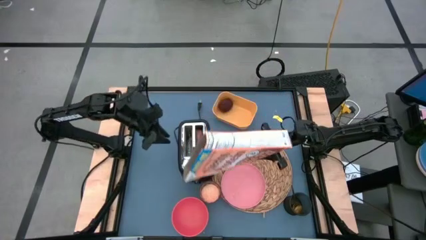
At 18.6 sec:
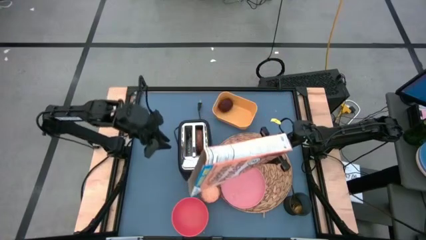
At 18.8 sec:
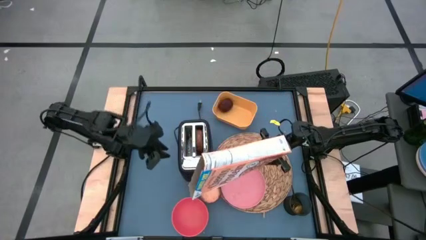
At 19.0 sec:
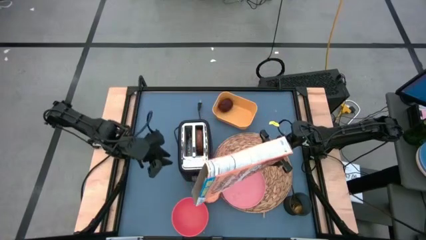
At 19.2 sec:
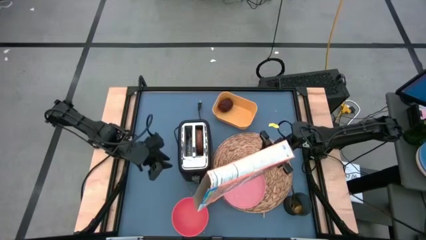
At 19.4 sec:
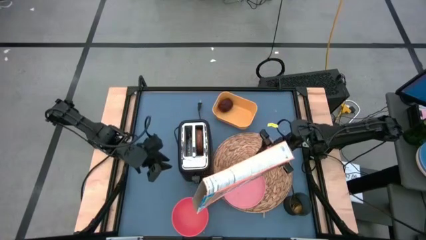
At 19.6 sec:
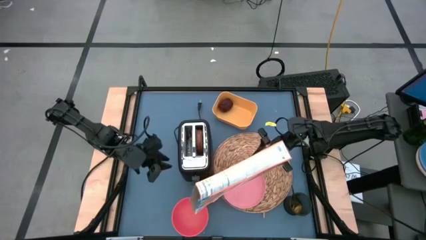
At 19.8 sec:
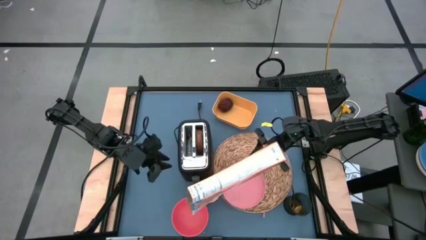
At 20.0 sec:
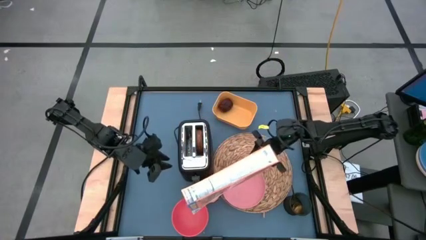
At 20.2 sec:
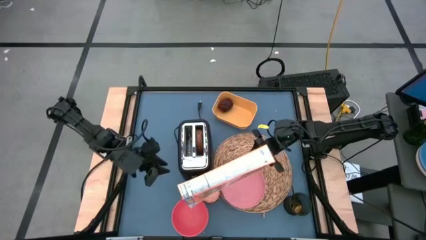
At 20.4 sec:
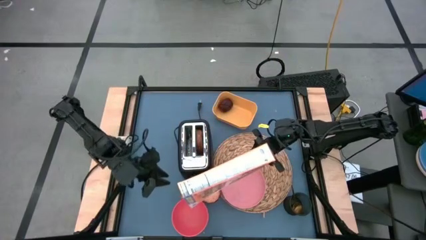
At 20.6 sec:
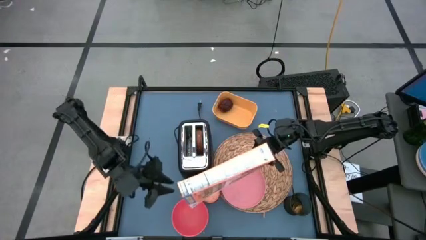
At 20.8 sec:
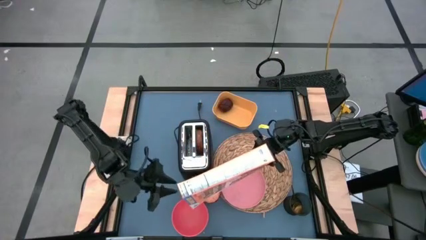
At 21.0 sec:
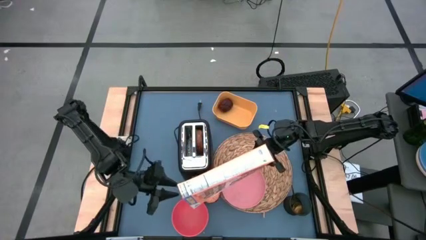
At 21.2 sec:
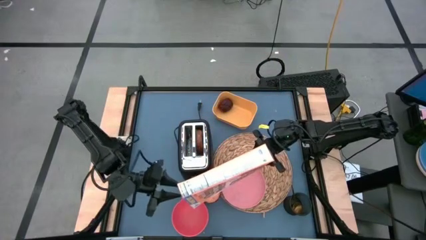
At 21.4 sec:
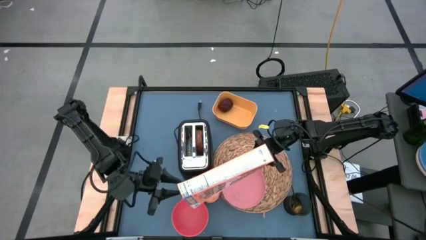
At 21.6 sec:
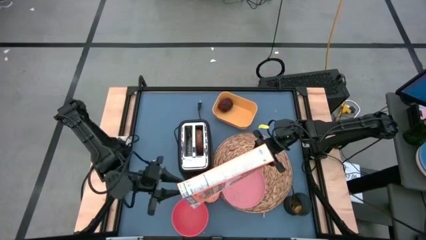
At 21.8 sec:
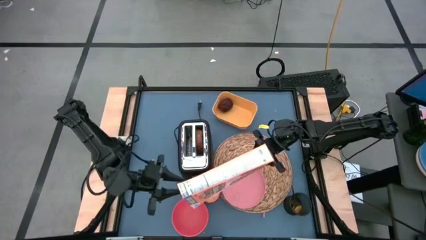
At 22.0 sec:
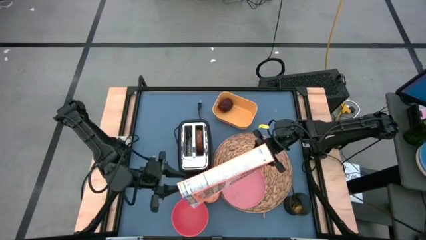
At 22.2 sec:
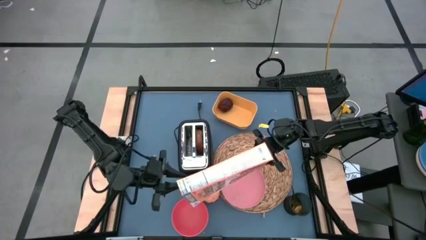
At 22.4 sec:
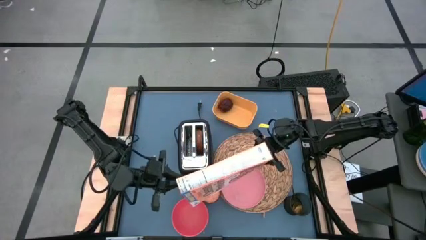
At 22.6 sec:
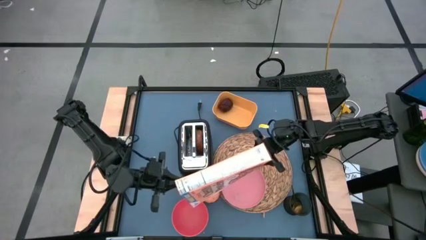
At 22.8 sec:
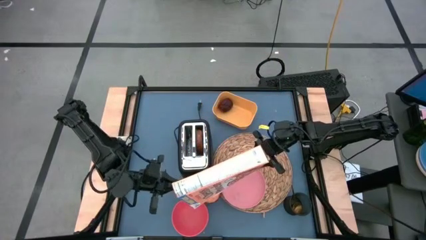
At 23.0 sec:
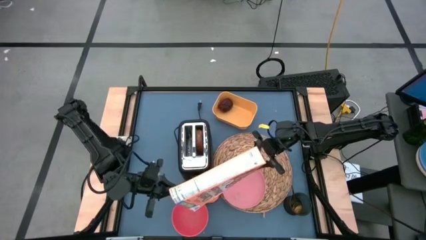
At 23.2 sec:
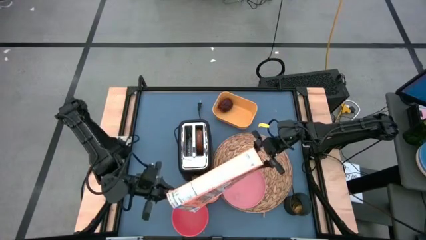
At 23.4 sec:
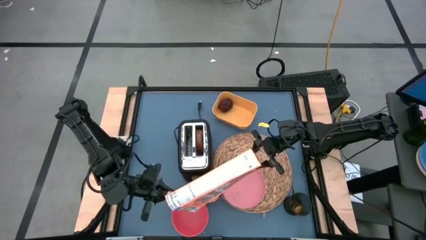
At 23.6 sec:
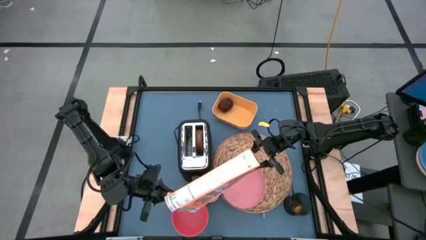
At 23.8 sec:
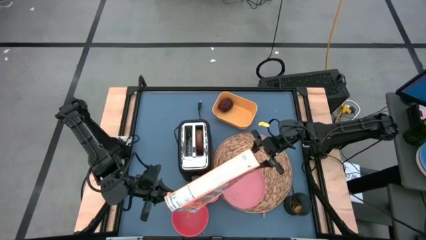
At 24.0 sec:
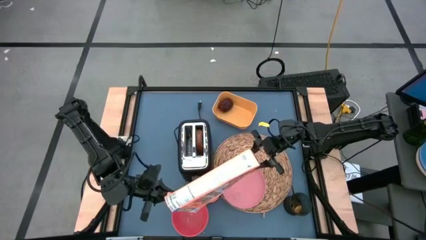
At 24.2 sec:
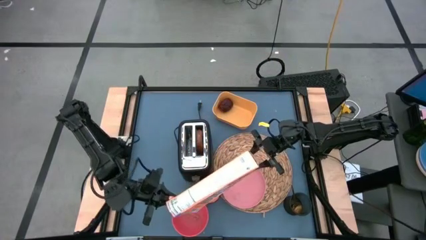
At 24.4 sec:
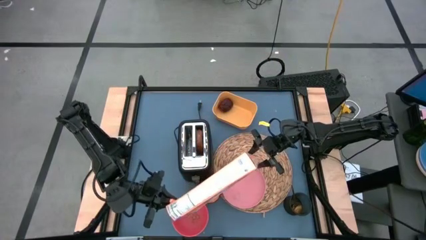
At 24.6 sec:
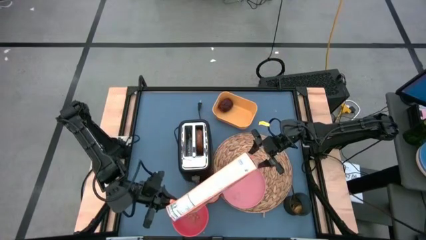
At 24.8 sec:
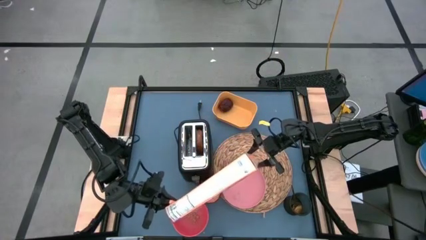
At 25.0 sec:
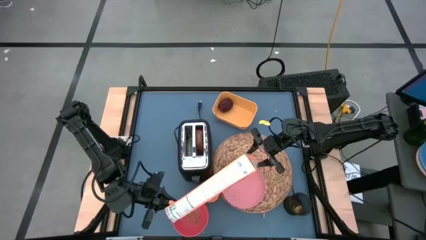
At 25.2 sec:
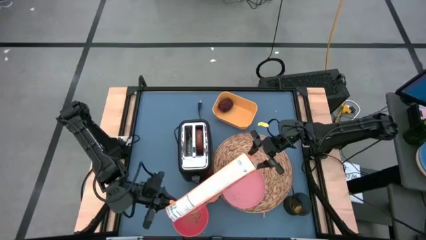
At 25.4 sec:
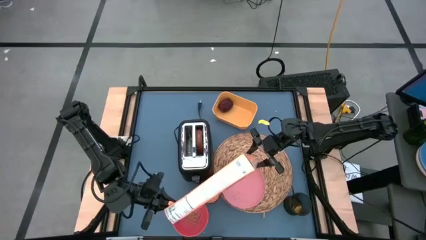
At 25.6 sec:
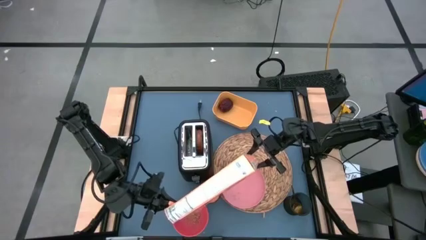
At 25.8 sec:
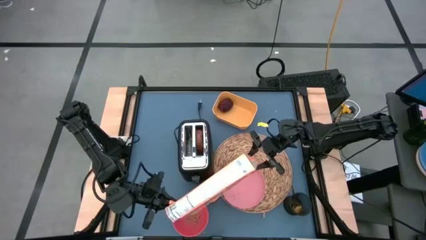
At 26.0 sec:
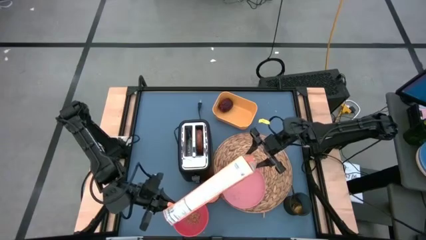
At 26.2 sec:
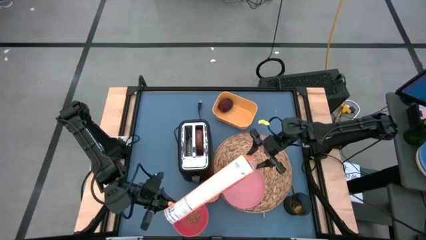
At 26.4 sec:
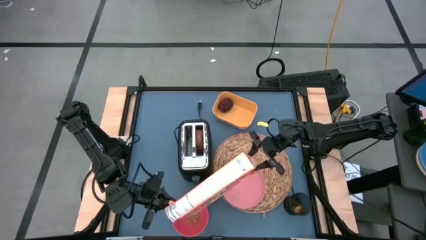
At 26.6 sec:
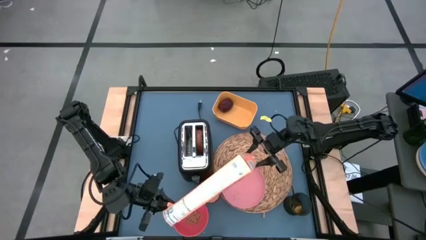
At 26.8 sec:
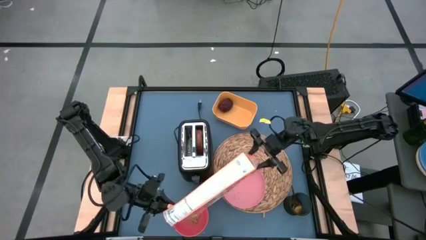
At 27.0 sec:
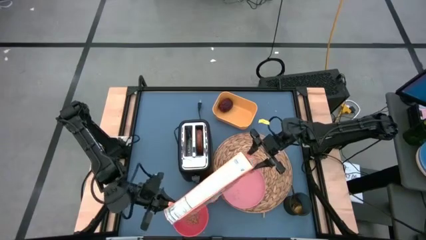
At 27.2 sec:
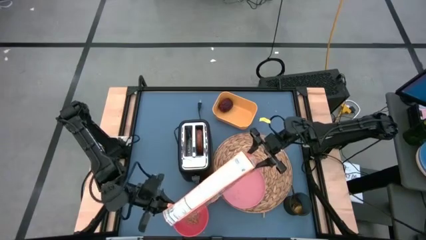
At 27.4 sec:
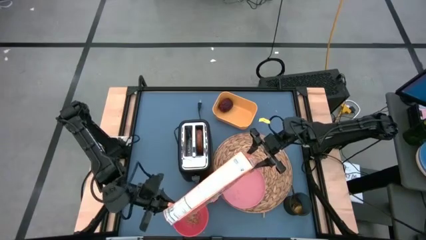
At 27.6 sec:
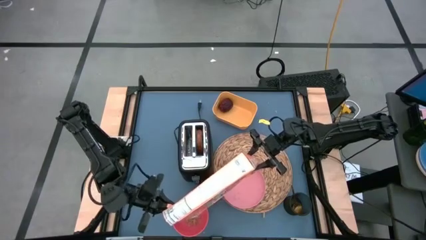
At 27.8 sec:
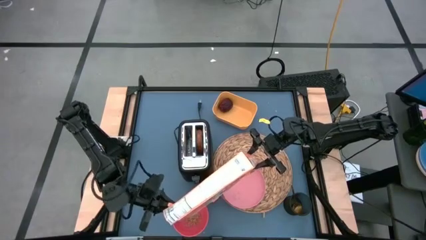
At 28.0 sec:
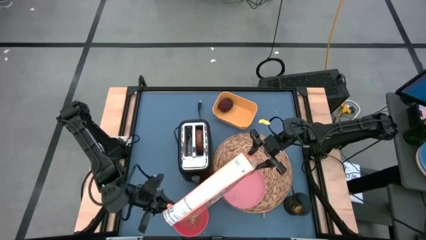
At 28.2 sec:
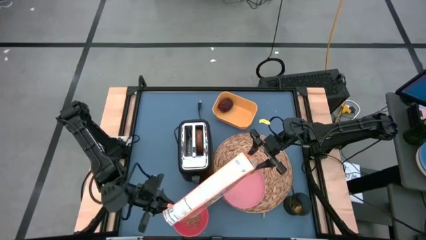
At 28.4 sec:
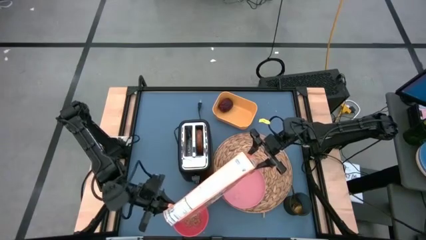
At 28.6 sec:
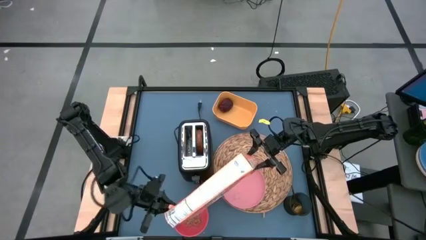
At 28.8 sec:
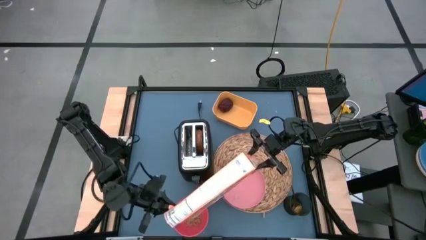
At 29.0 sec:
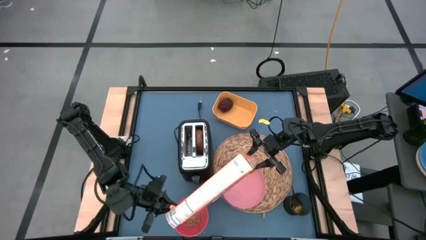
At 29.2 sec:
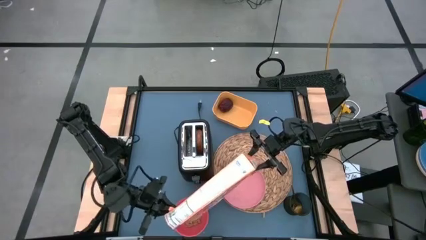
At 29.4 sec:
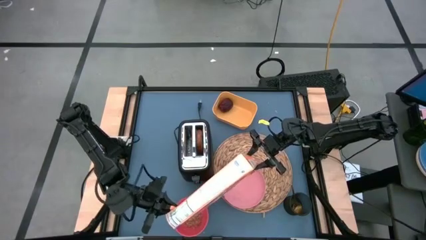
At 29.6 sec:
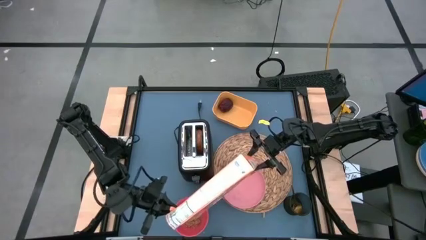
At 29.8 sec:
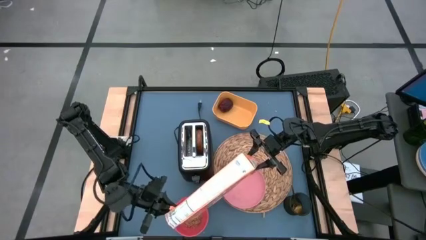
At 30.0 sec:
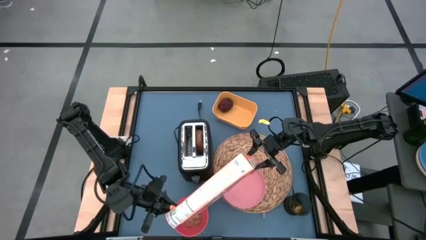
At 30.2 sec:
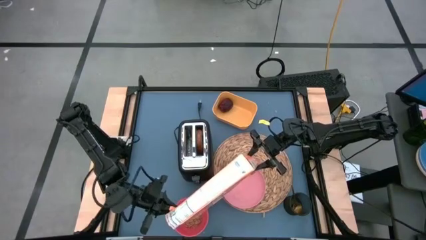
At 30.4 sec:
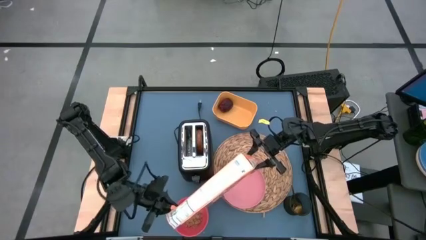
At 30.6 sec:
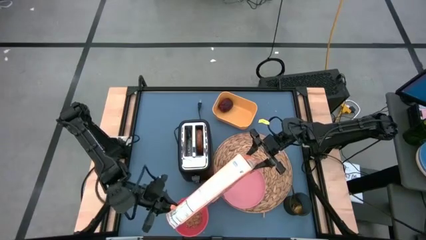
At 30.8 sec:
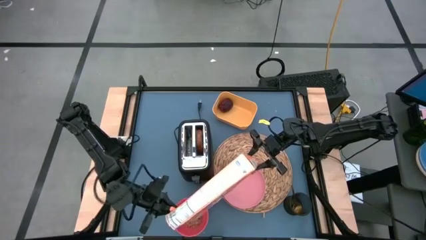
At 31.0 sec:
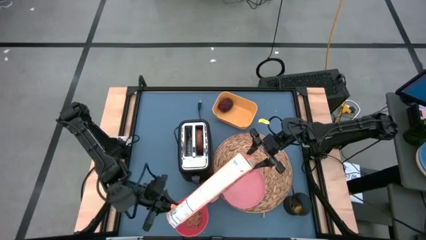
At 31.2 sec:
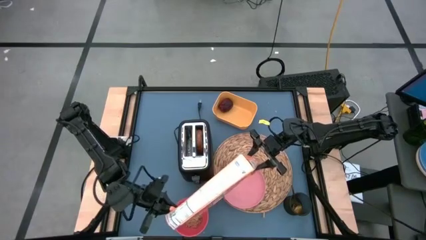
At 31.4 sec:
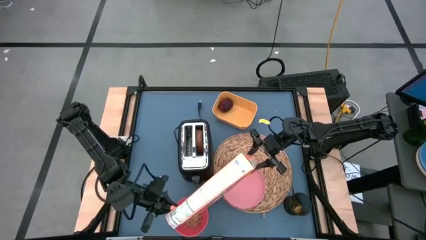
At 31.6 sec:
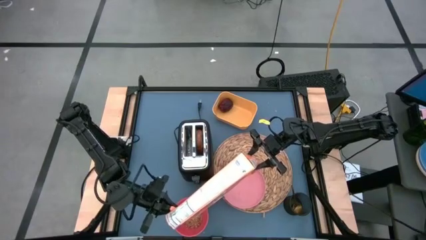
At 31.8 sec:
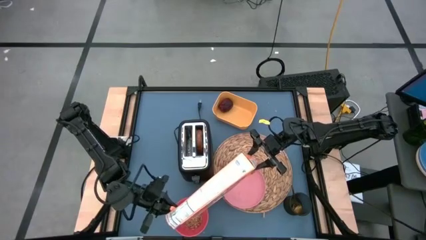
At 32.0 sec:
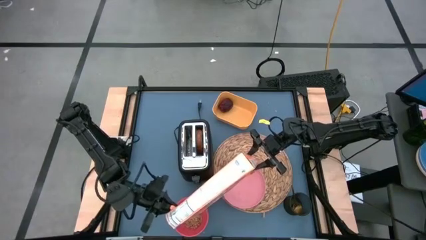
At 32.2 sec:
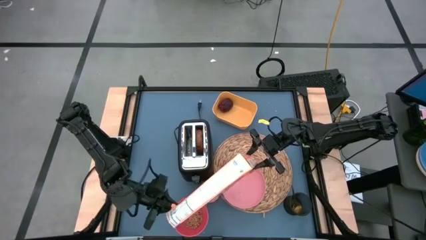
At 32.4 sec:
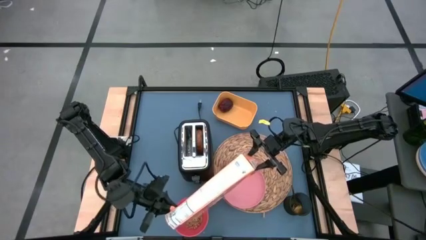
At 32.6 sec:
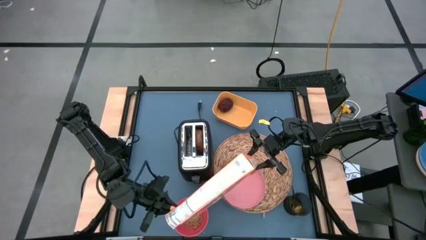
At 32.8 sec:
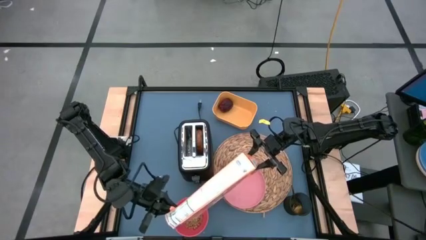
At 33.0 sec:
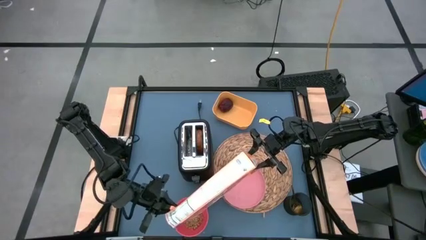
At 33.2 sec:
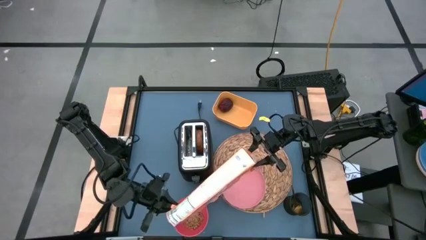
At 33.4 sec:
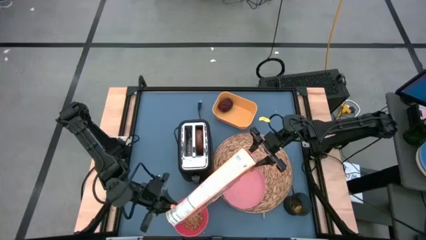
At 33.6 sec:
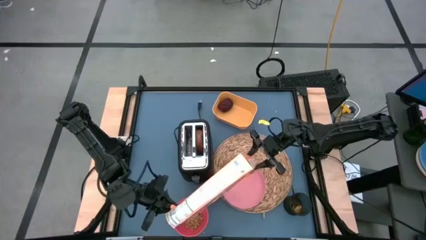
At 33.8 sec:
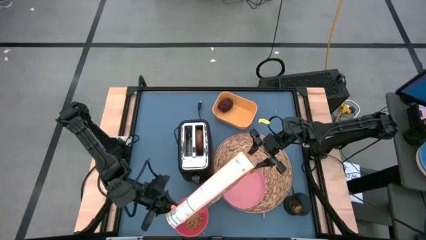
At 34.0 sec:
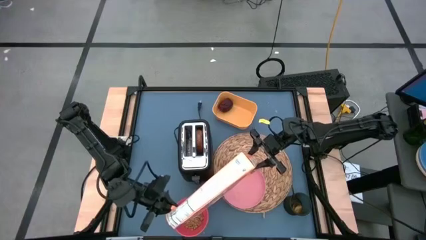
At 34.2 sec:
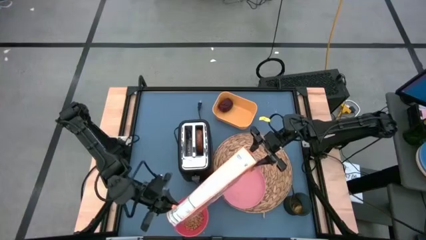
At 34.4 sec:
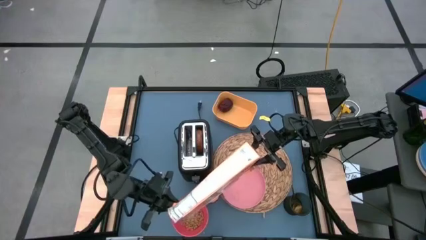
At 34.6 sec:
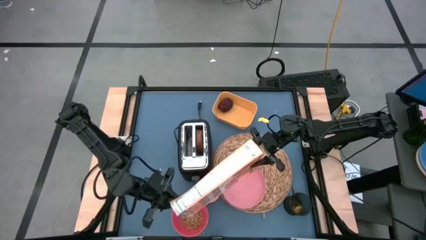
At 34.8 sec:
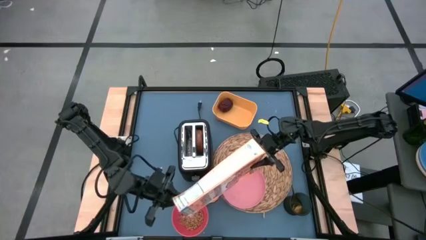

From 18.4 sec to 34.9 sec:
Task: Arrange a breakfast setting
Pour the cereal into the orange bowl
